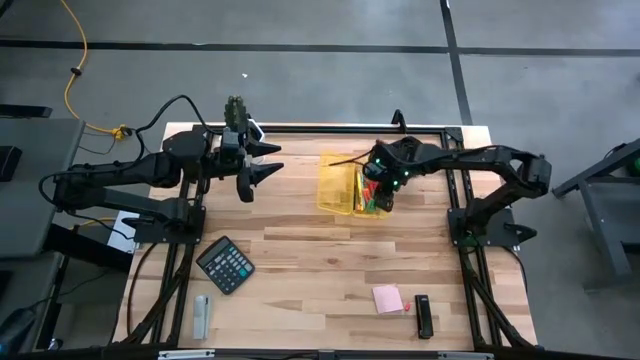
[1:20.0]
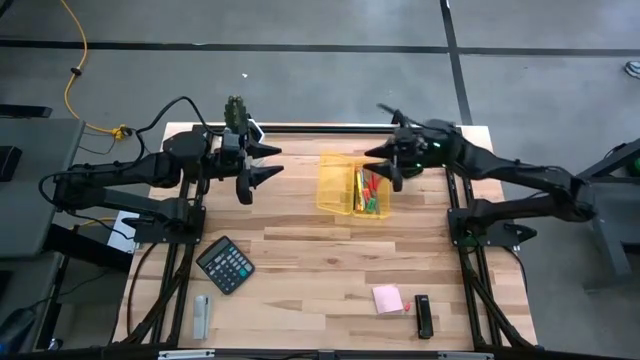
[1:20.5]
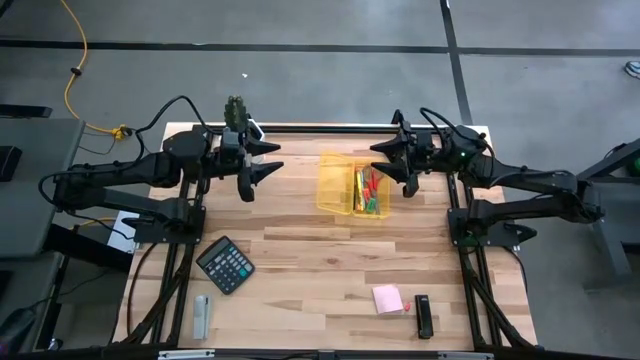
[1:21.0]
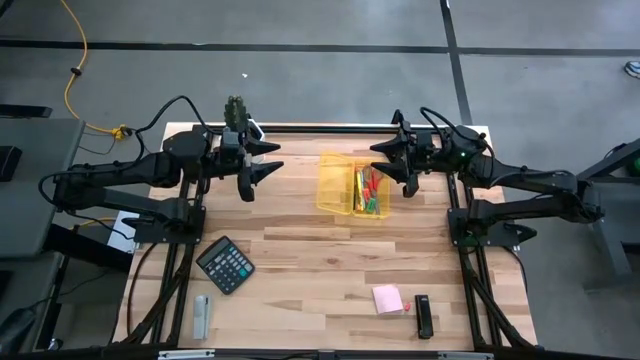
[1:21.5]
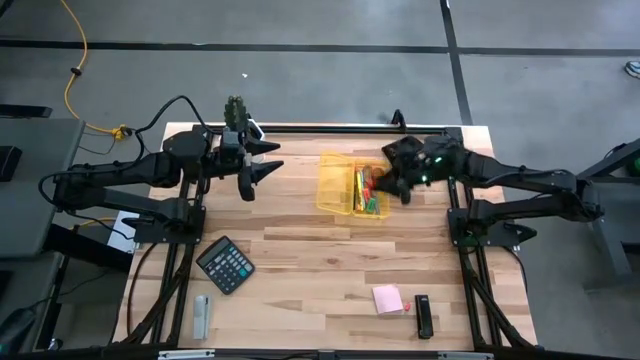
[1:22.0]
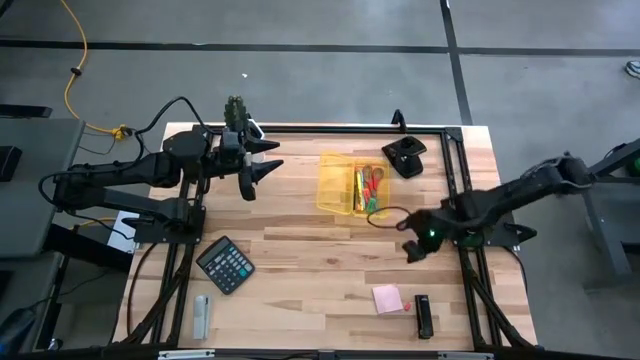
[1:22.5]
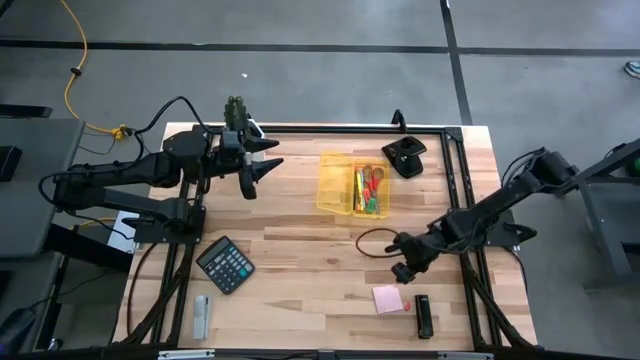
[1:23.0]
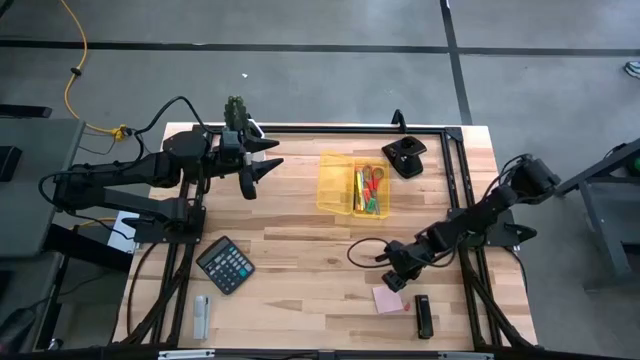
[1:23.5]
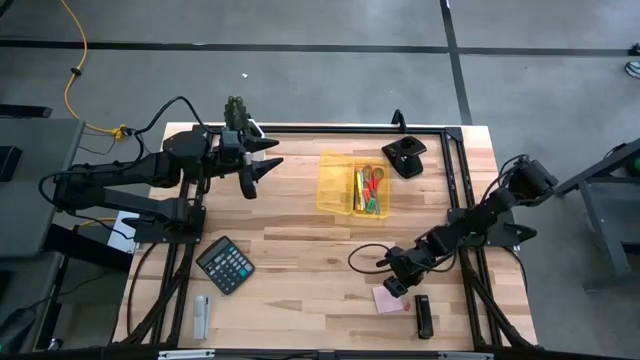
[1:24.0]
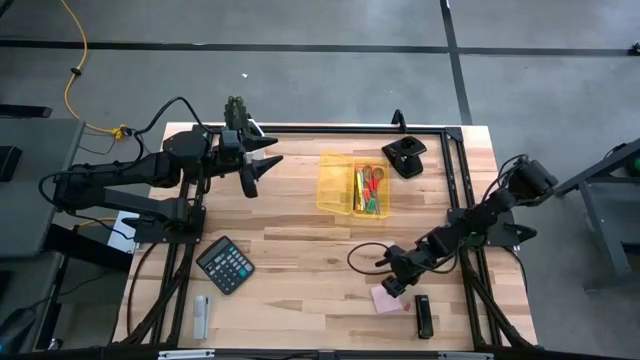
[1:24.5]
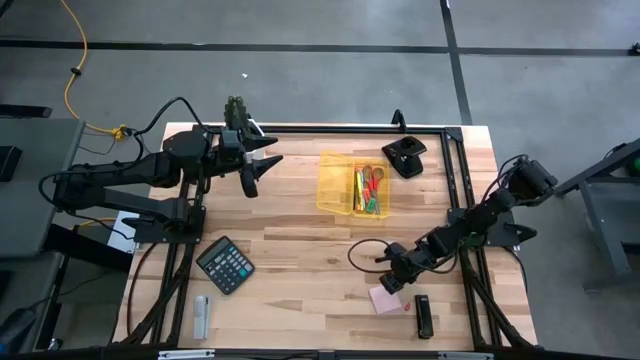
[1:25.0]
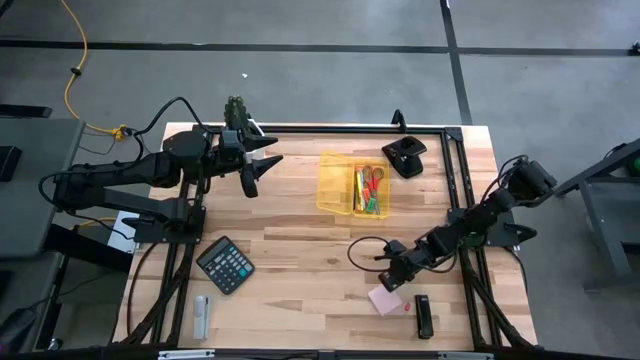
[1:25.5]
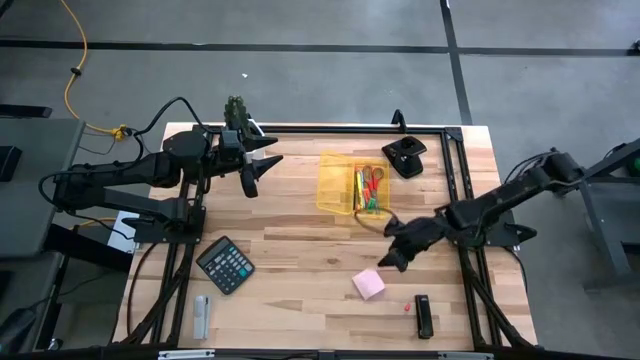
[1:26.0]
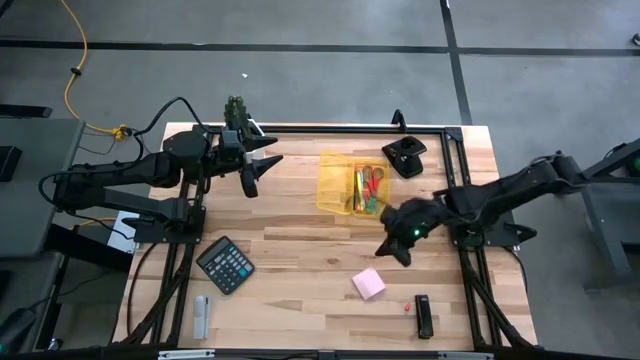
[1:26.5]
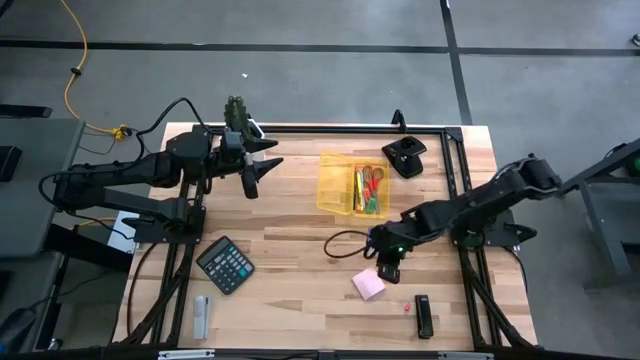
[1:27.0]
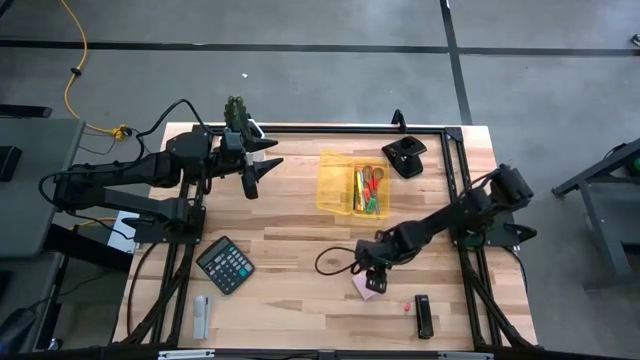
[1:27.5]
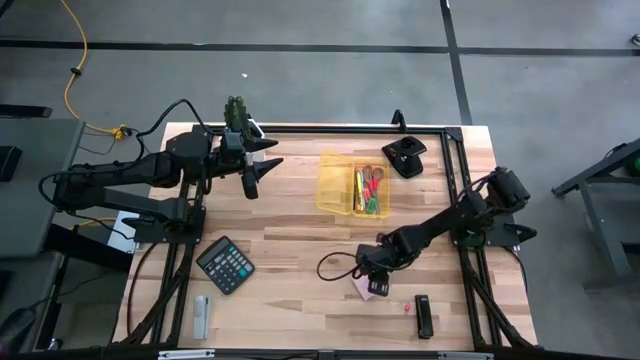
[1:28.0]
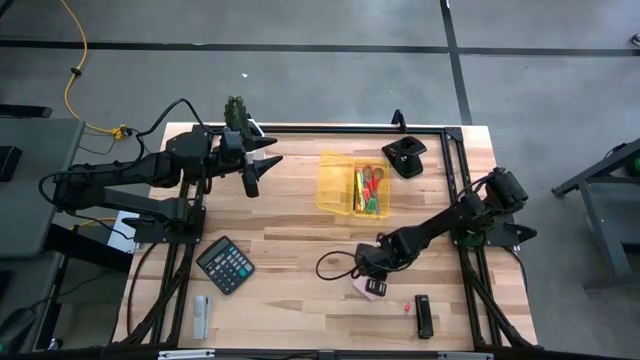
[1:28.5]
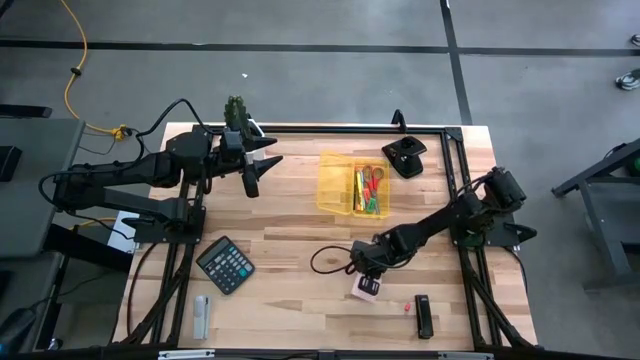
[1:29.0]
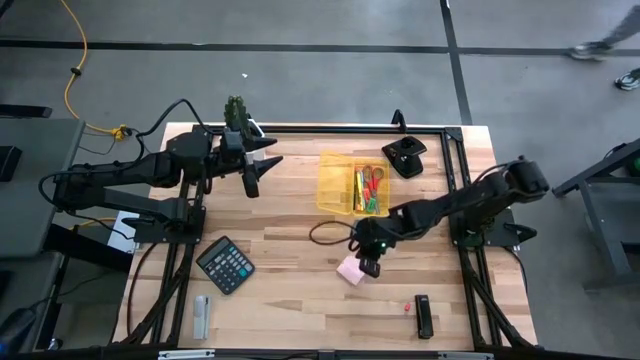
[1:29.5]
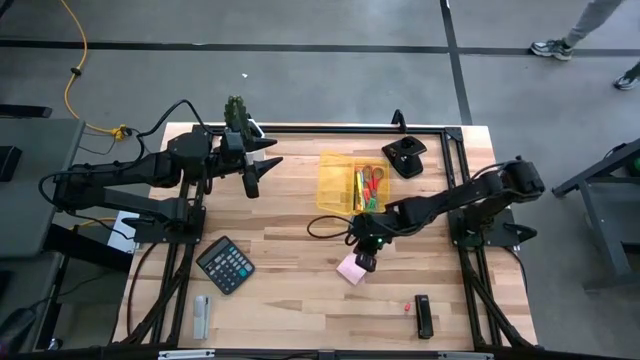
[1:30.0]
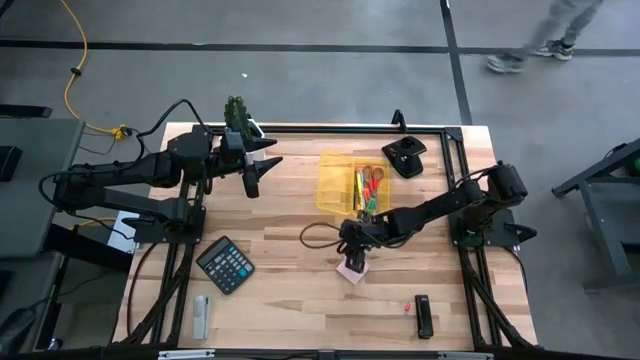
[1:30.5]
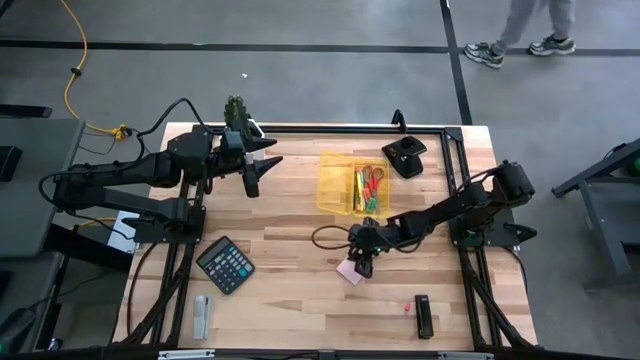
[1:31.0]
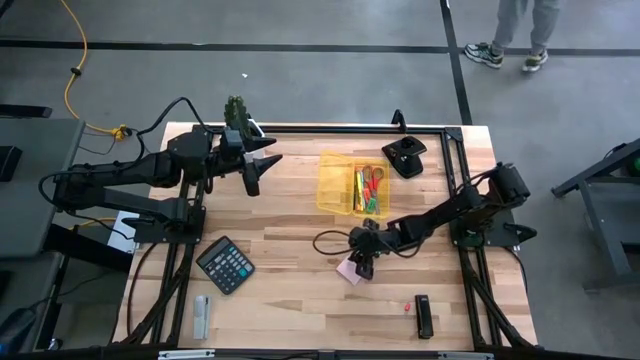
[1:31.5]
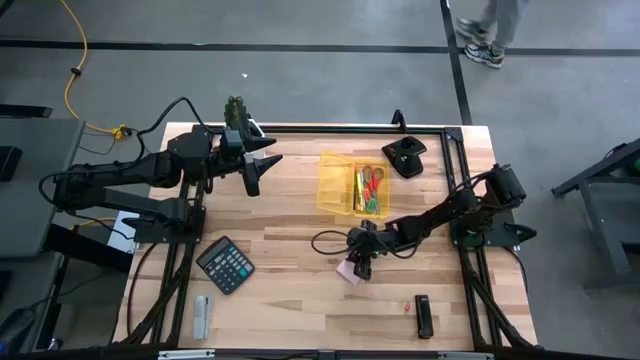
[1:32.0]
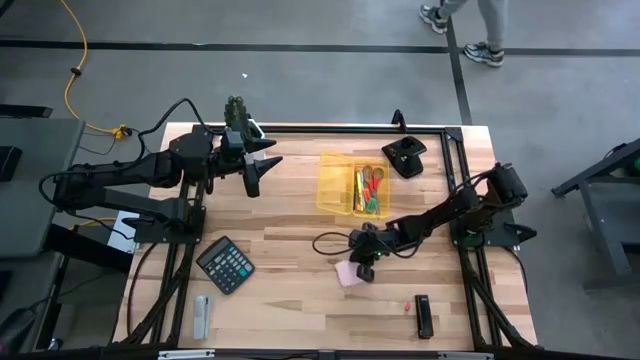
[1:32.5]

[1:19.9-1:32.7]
Task: Pack school essentials
Put the pink sticky note into the yellow supply box

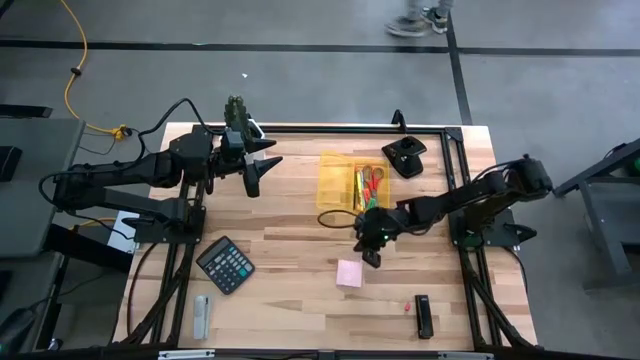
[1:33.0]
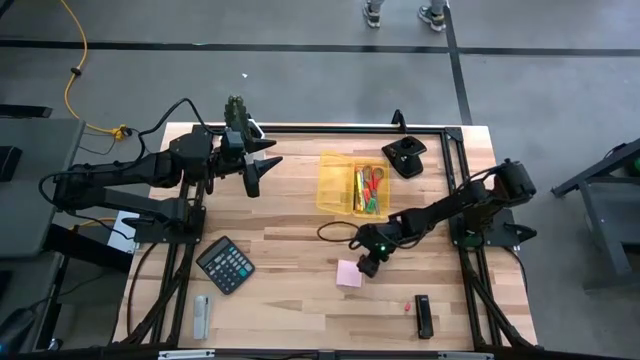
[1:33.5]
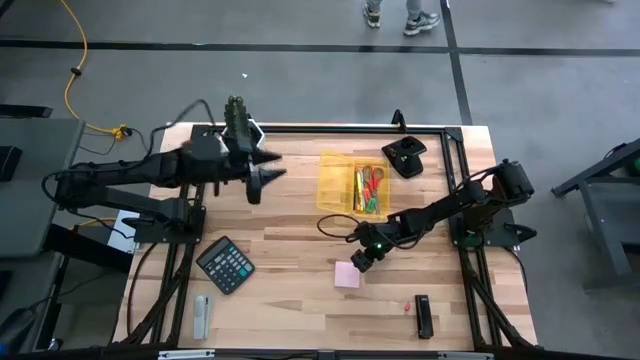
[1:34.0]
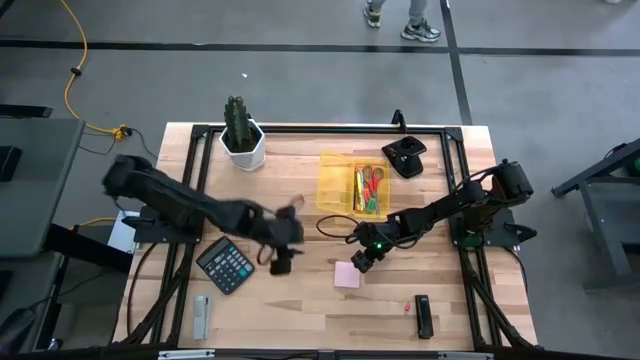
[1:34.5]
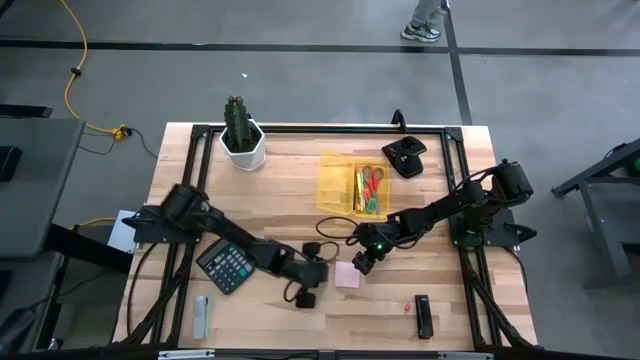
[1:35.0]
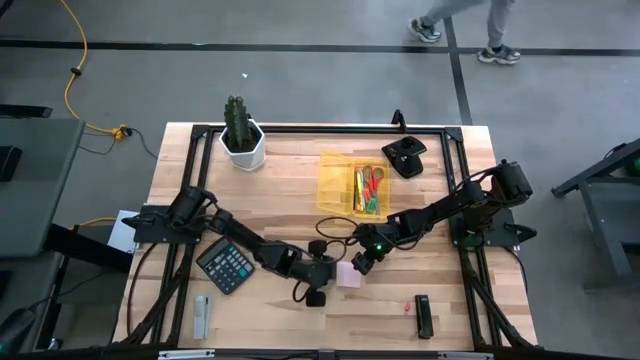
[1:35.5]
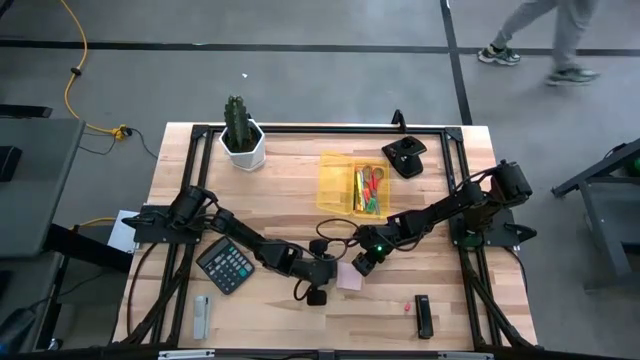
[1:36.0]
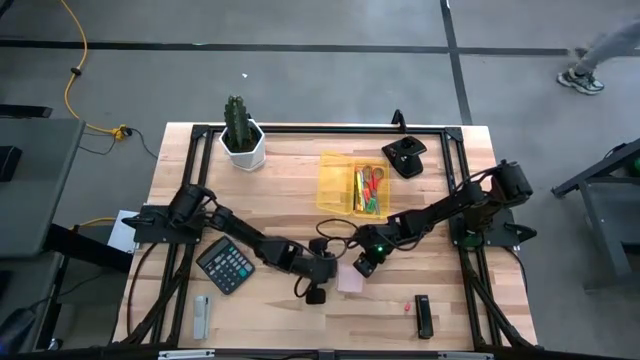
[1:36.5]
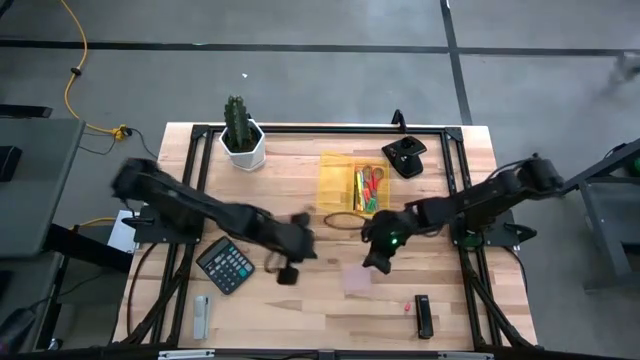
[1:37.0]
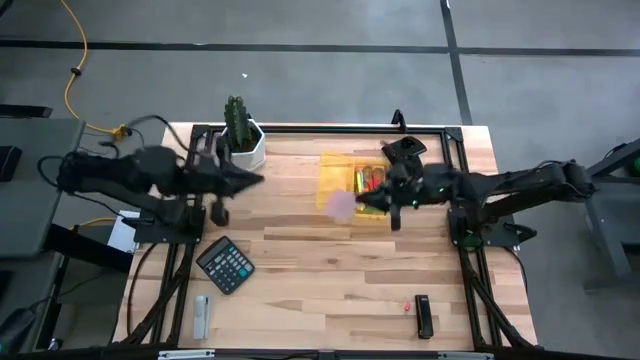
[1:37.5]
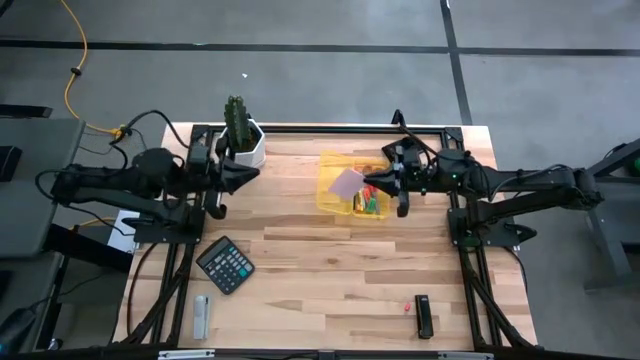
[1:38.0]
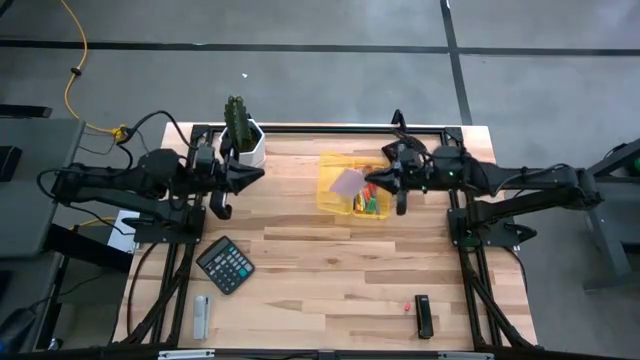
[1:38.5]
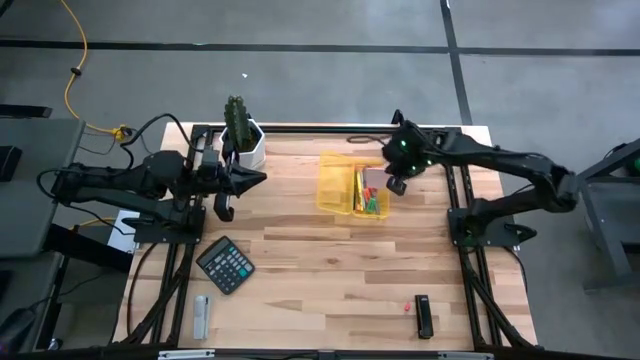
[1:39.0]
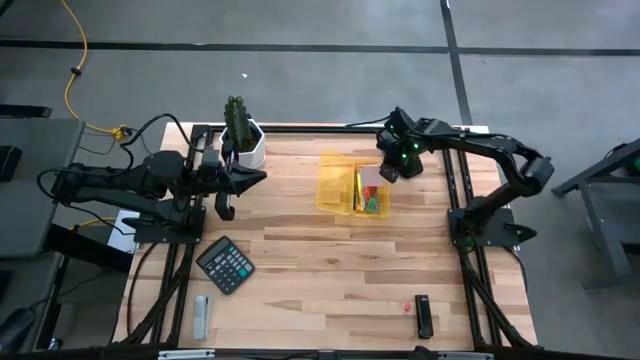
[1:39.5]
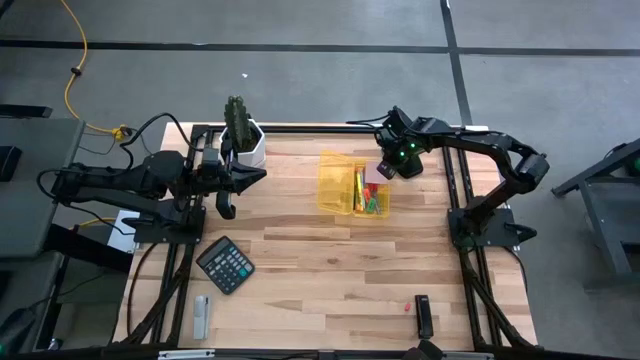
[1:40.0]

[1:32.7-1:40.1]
Put the pink sticky note into the yellow supply box
